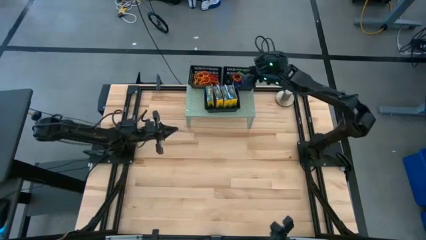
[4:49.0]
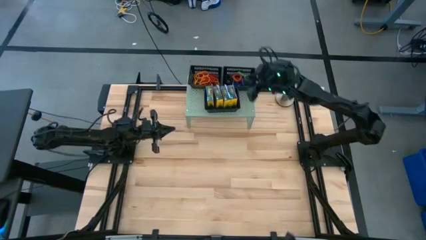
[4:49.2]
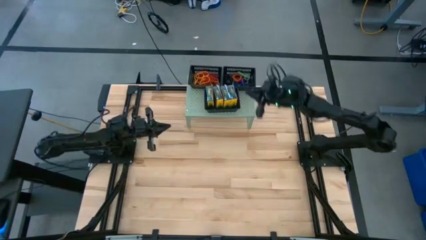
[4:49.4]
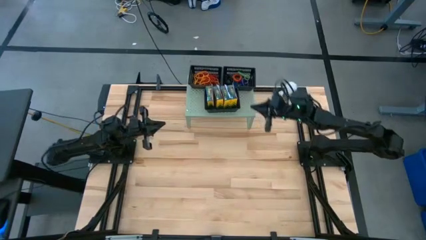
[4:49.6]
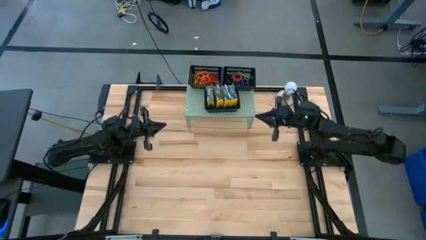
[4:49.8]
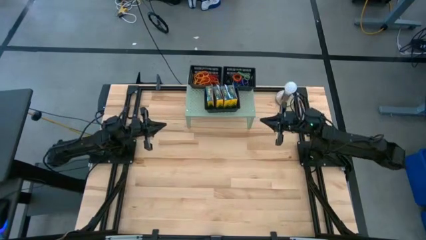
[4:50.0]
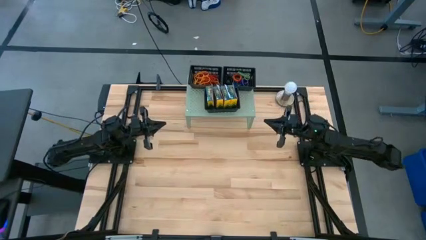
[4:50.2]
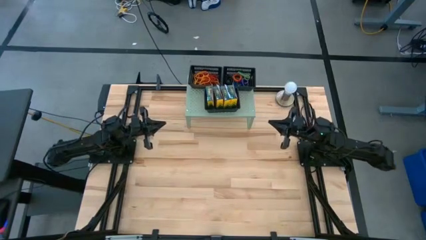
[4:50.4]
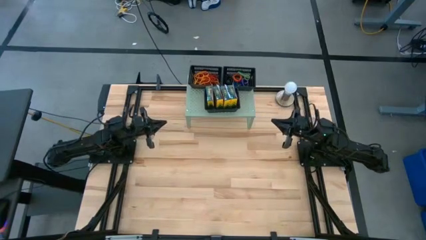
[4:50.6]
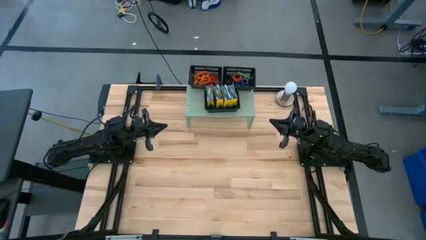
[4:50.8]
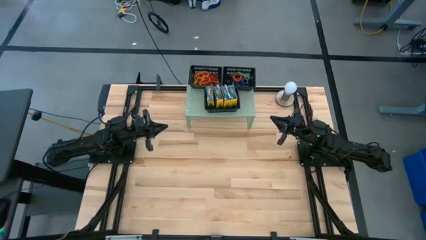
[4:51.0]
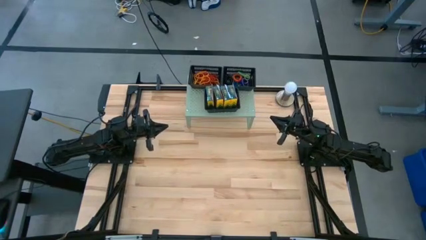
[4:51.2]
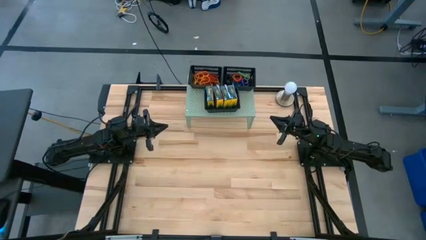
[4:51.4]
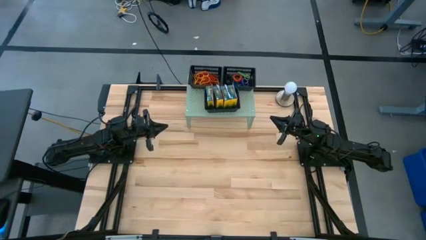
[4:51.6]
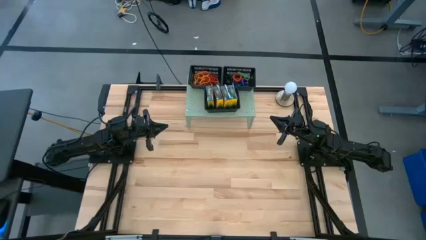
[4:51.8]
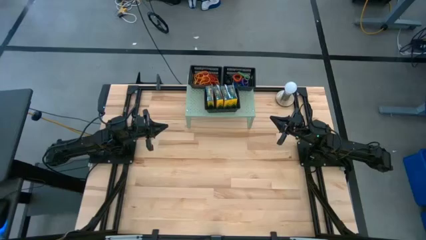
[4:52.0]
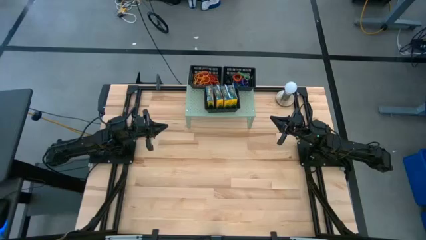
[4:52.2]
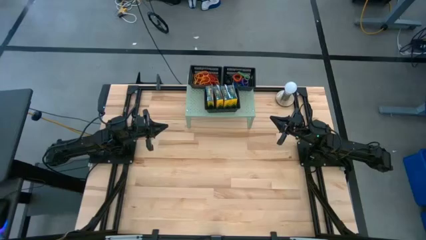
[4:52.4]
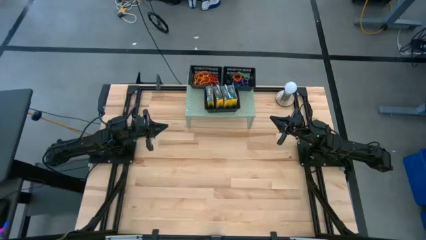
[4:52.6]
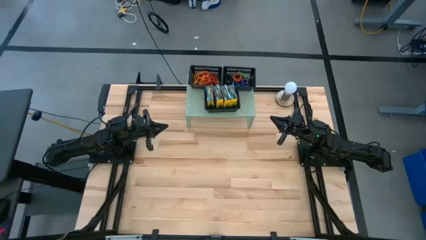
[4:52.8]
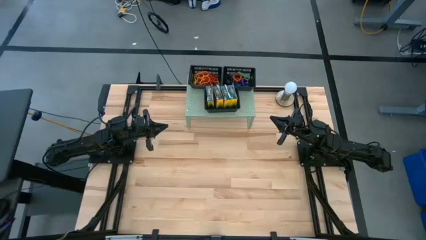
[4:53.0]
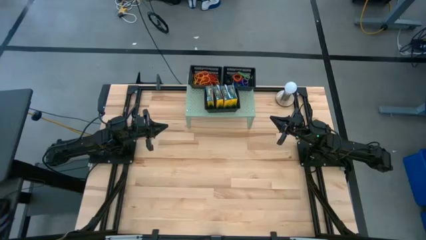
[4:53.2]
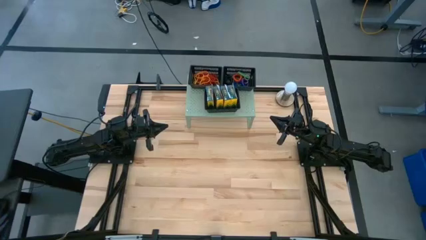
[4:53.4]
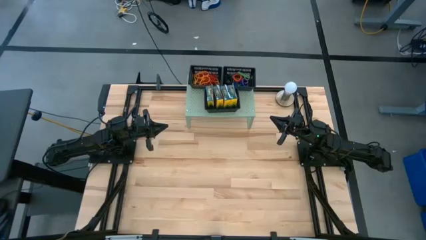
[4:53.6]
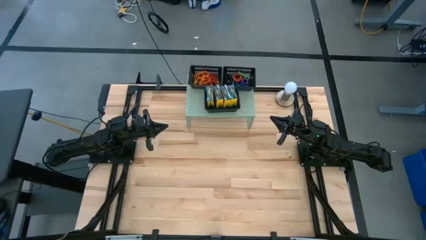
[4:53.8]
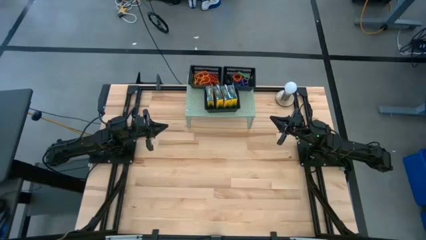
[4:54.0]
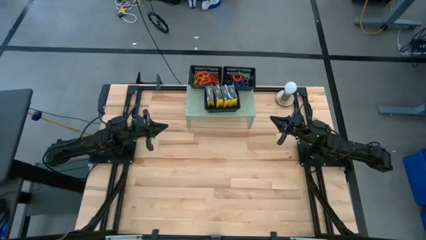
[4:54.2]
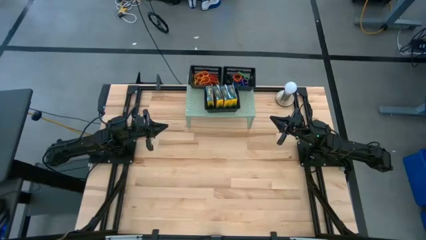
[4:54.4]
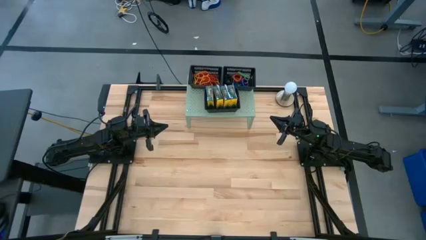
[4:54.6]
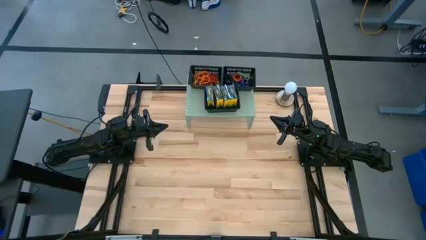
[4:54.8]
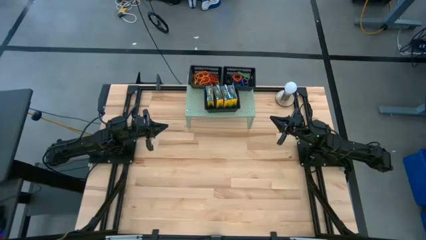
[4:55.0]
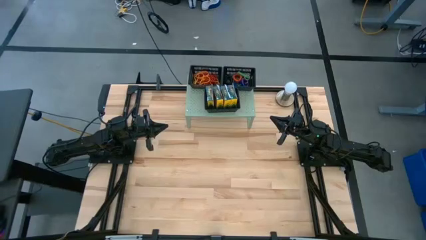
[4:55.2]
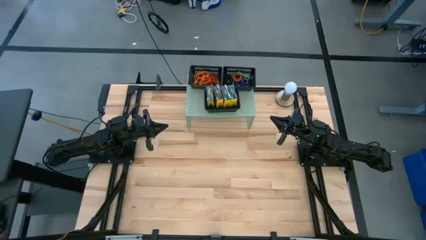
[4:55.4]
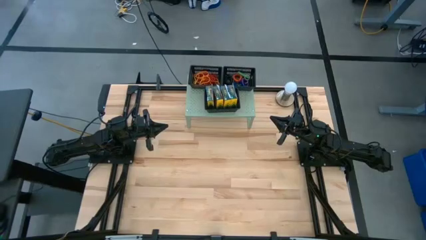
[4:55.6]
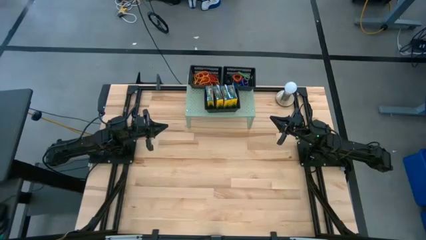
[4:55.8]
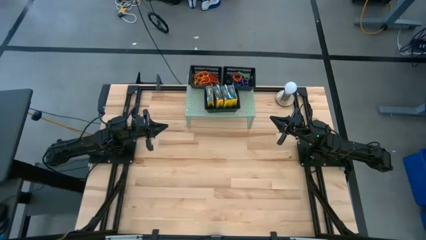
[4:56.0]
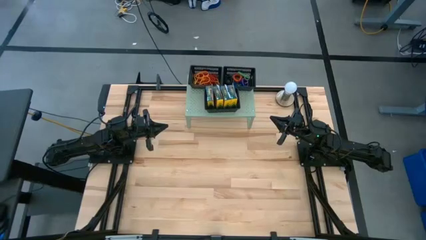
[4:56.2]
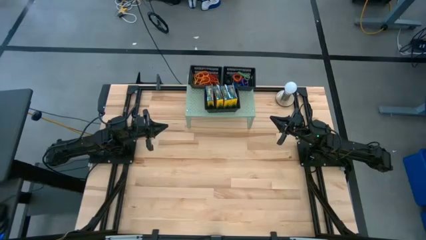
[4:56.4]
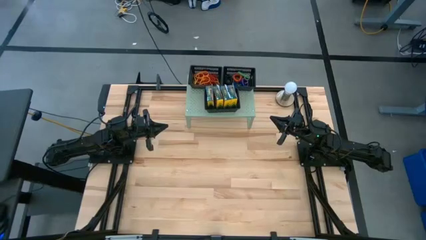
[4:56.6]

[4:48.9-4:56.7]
Task: Pick & Place Office Desk Supplies
Return to Home Position
